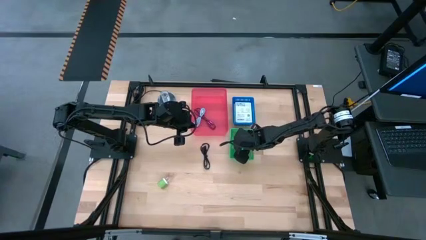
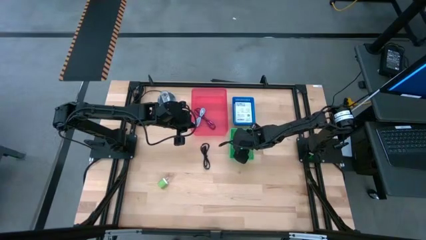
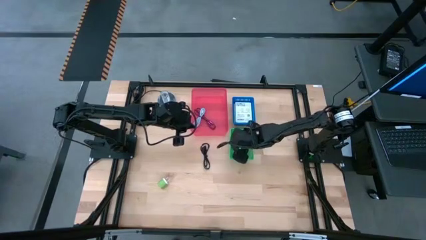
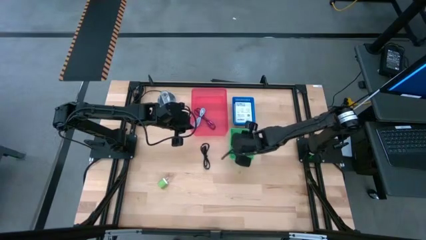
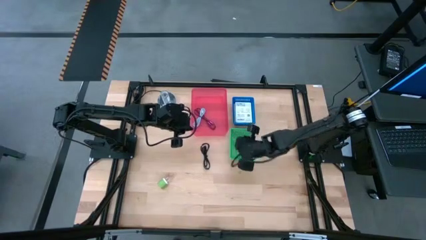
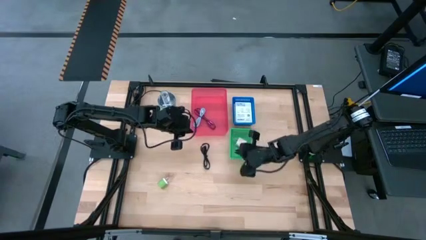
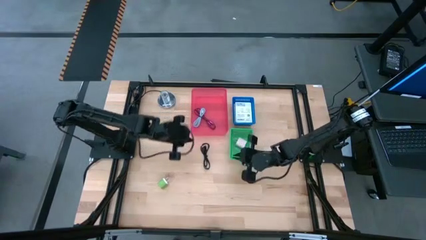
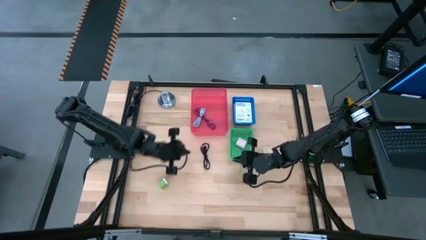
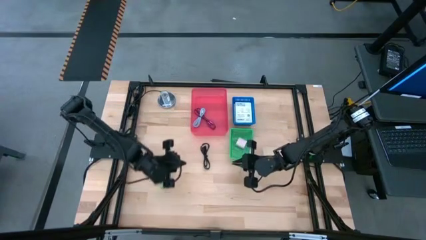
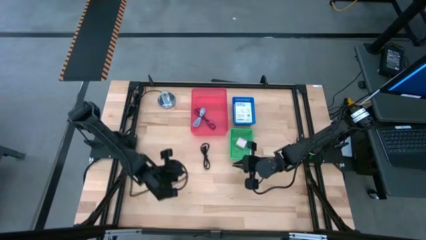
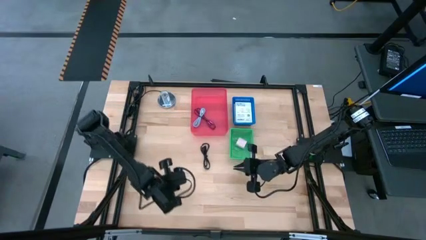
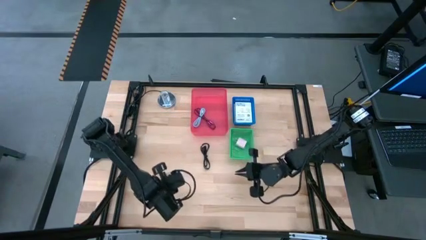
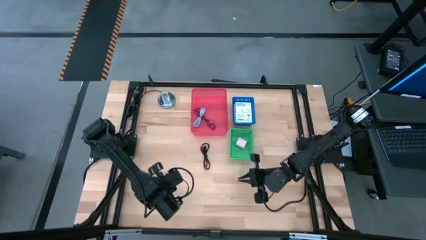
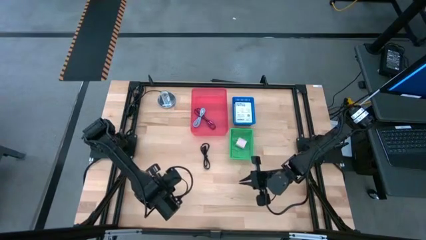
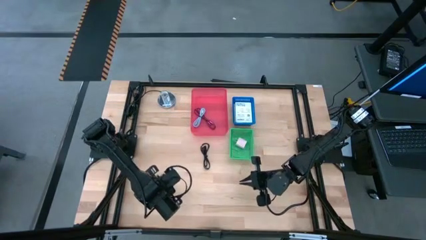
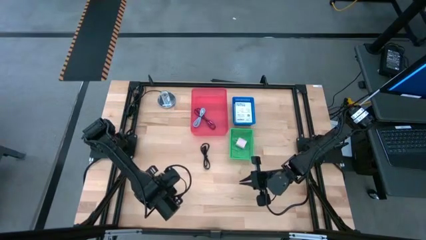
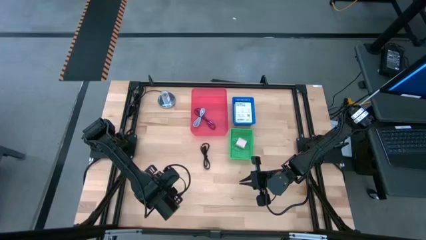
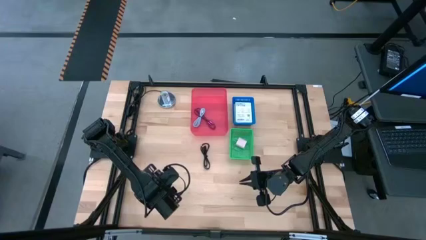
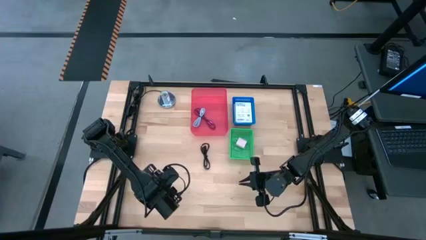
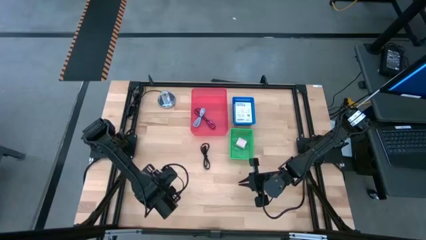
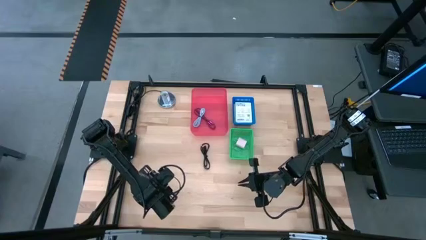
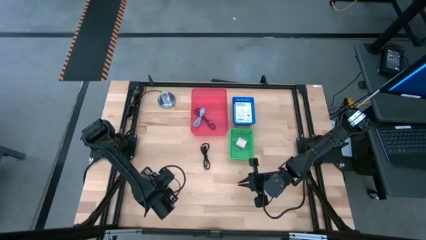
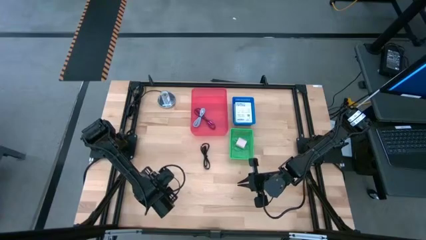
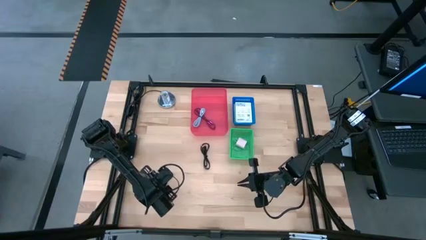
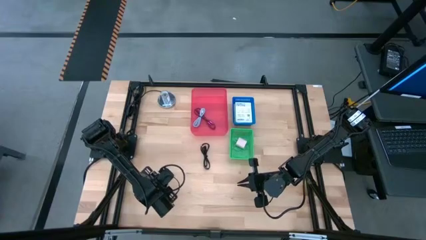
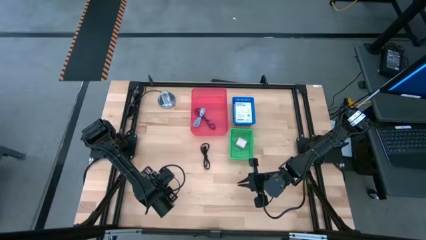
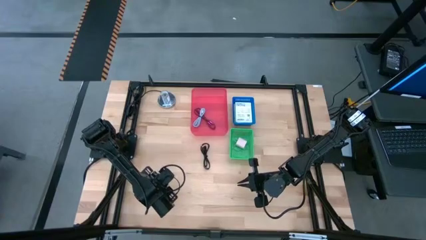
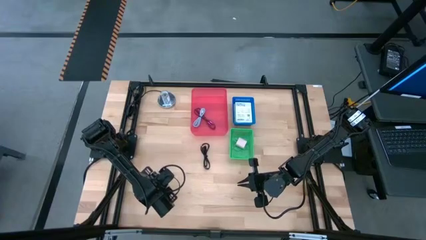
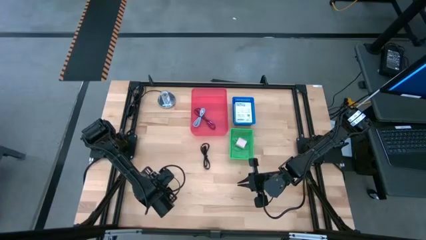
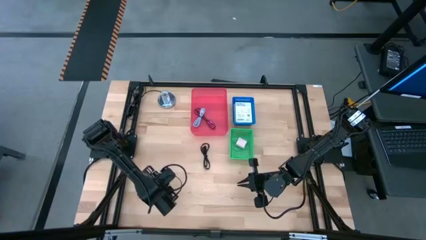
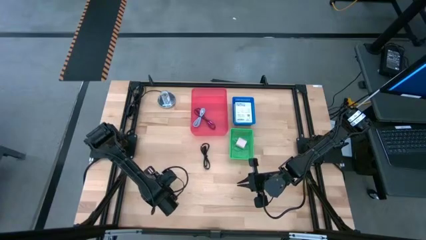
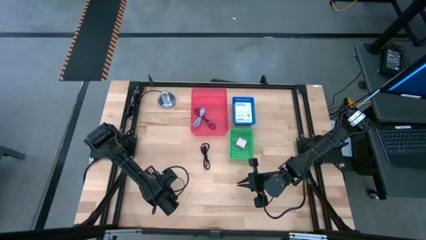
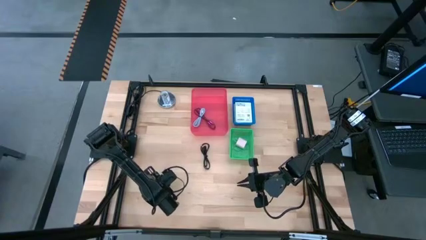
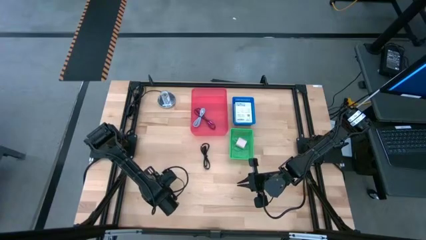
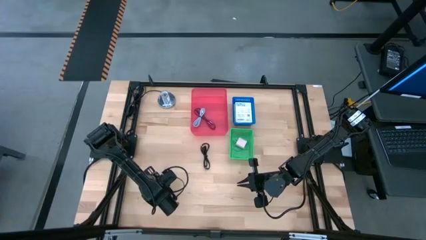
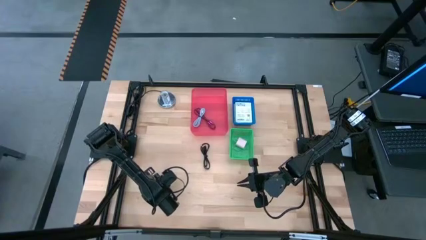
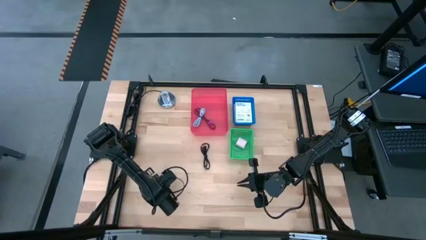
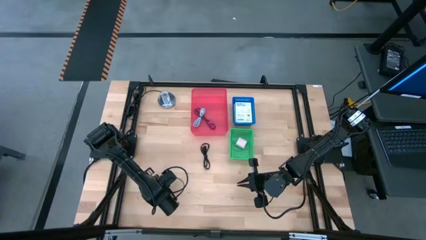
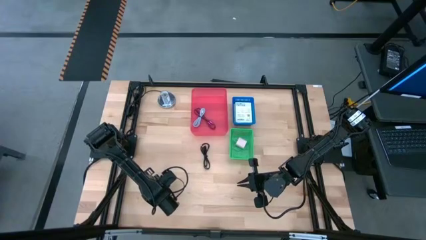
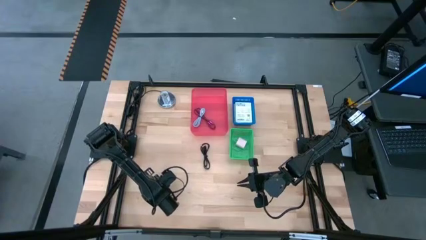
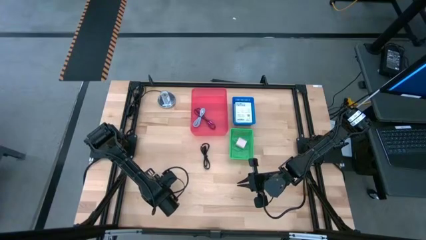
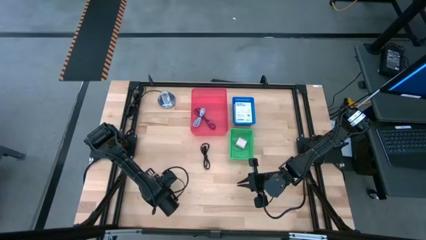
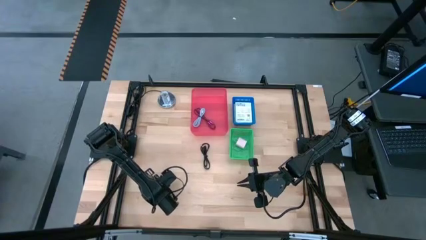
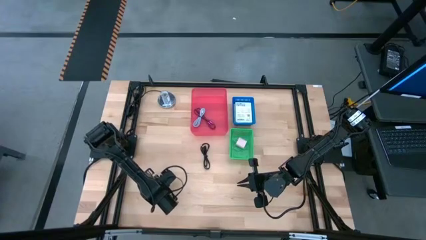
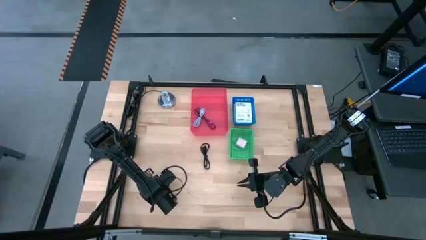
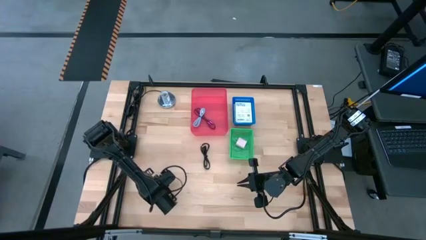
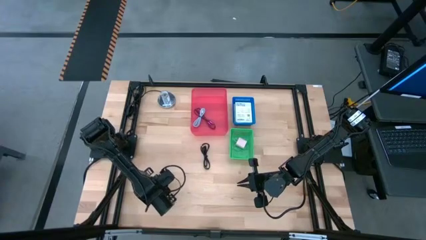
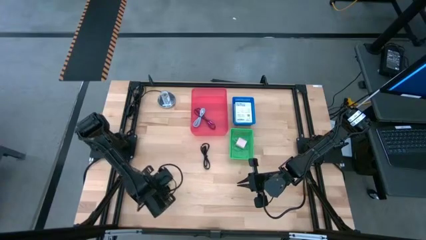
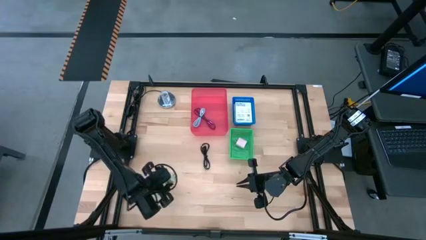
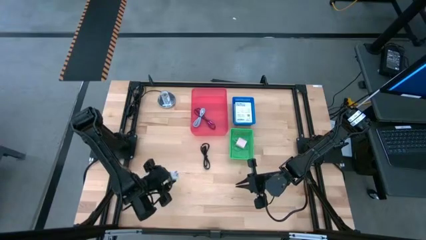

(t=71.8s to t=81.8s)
Task: Pick and place items into bin
Put the green charger adapter into the green bin
